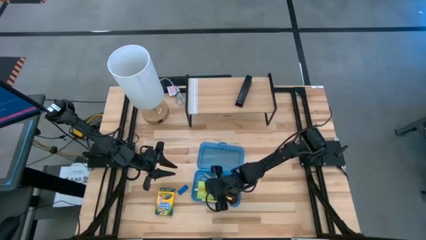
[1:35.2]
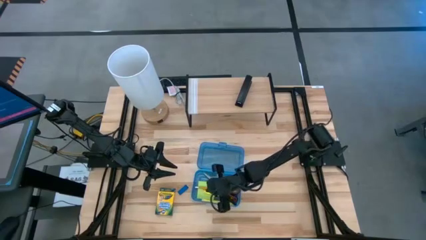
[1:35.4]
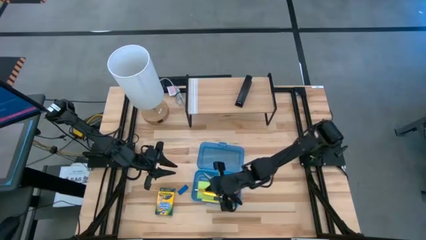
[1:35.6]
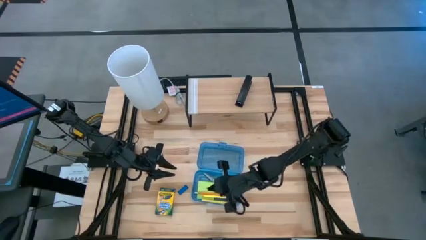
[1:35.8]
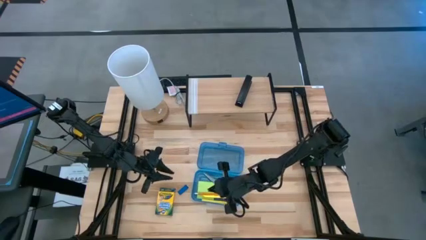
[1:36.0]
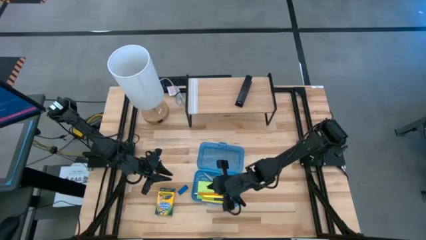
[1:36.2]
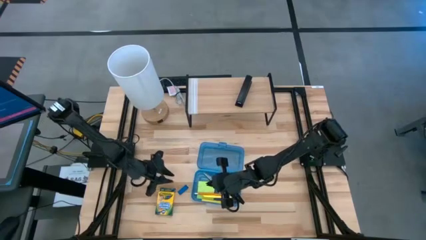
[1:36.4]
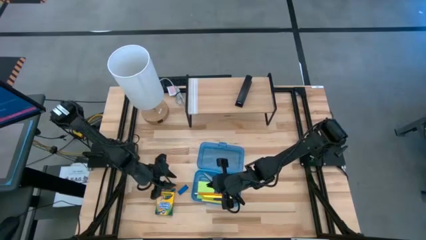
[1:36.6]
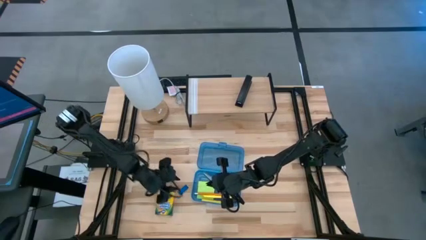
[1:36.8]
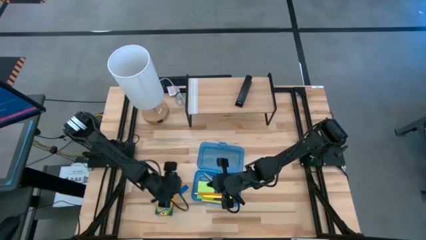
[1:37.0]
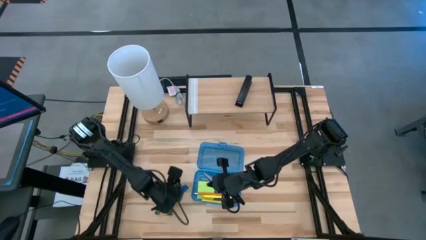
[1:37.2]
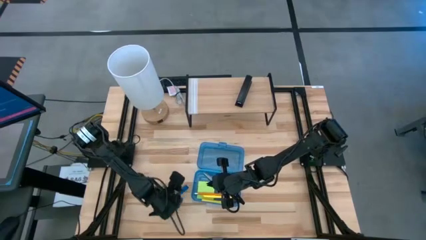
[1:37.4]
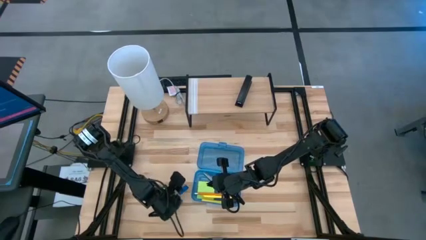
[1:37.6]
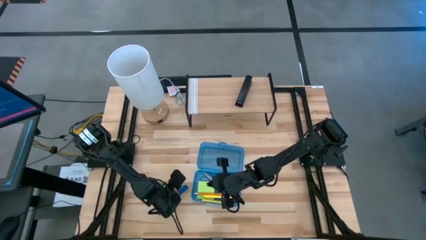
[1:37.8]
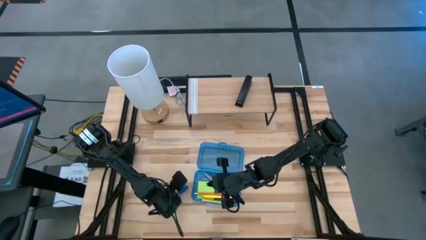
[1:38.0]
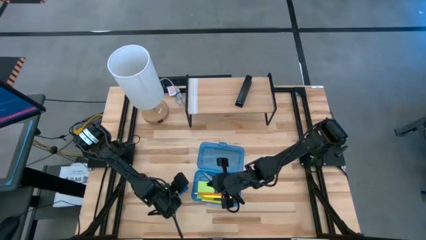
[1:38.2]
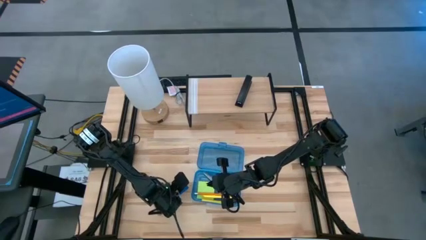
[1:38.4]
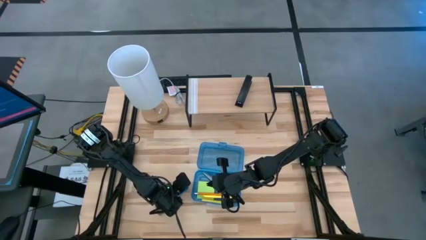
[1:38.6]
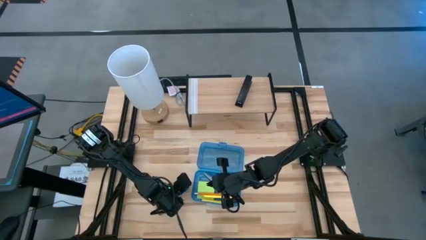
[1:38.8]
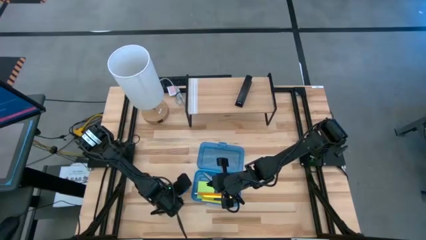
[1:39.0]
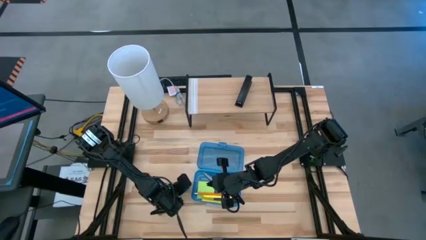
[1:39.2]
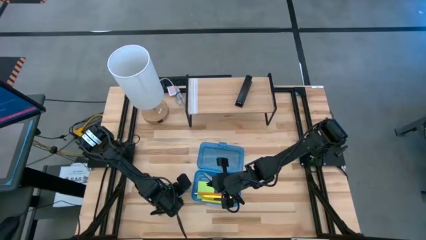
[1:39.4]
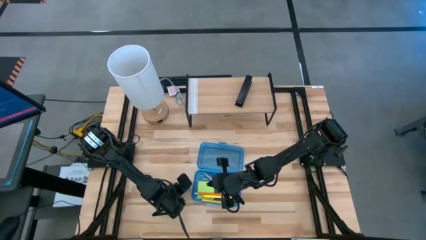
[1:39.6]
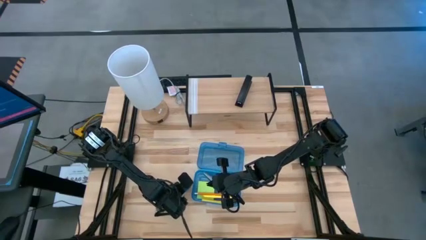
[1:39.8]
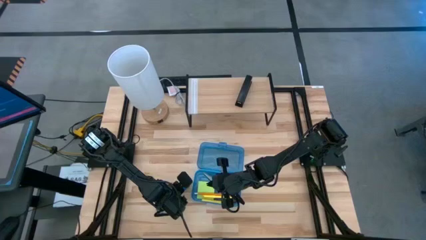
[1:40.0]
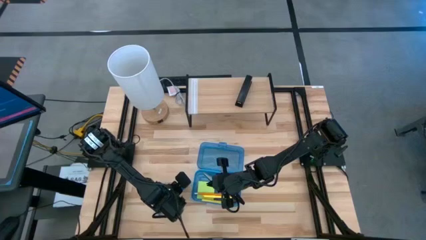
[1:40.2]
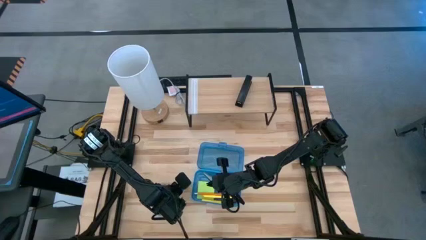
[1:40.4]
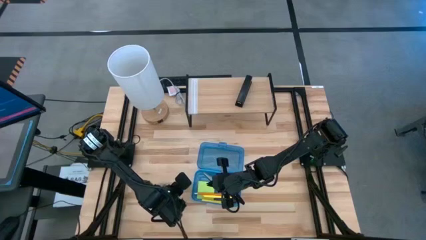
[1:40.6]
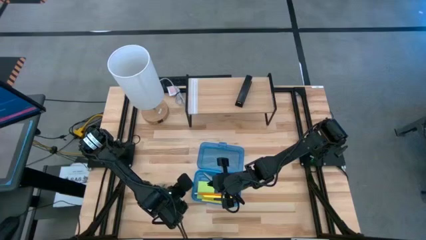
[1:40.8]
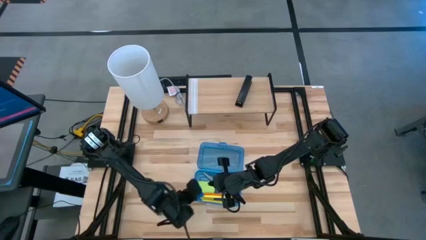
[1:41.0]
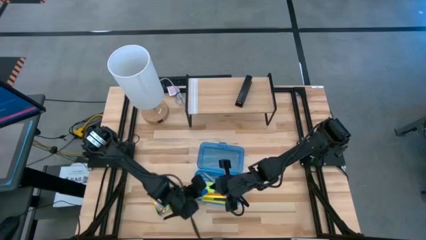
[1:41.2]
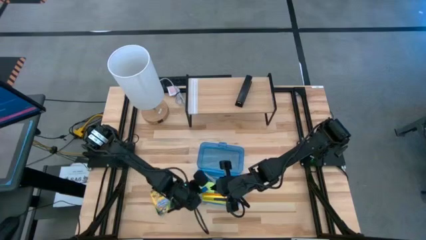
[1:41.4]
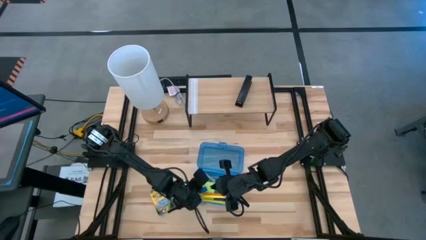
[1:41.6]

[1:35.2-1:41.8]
Task: Pack school essentials
Put the blue eraser into the blue supply box

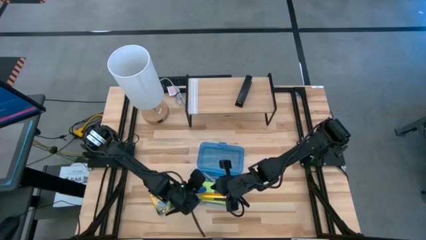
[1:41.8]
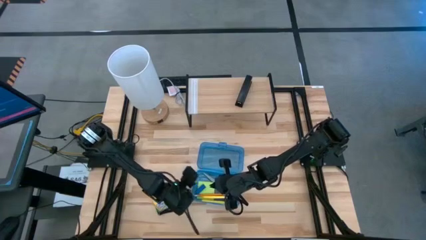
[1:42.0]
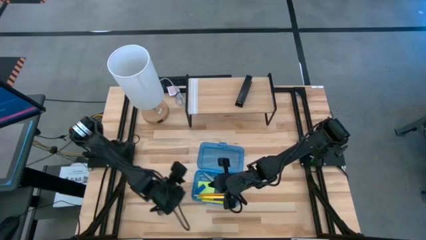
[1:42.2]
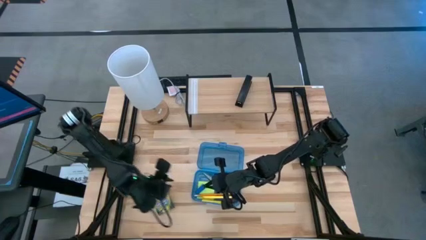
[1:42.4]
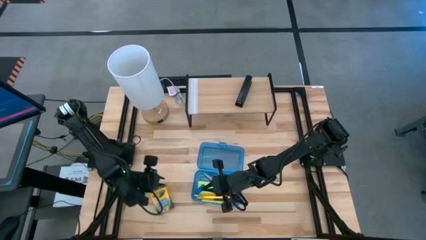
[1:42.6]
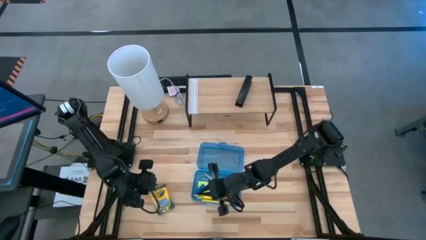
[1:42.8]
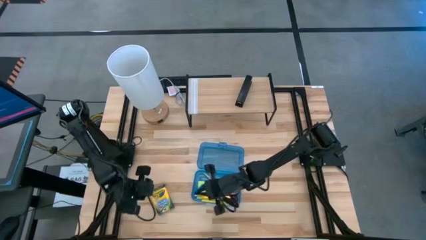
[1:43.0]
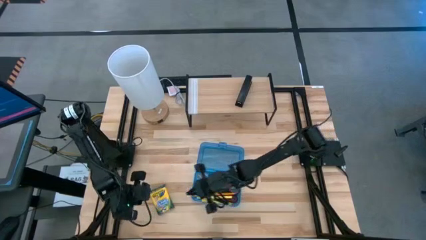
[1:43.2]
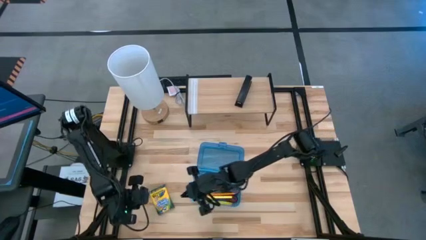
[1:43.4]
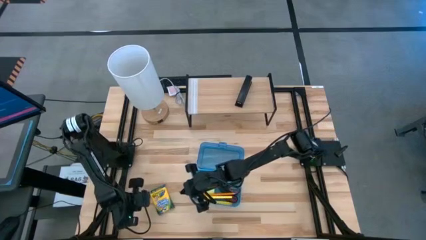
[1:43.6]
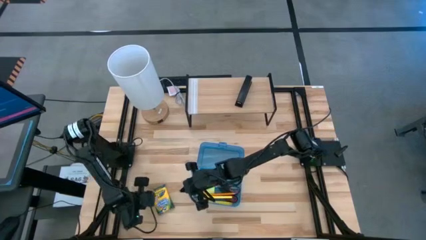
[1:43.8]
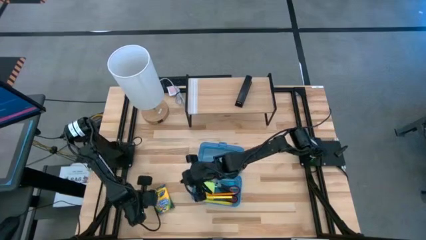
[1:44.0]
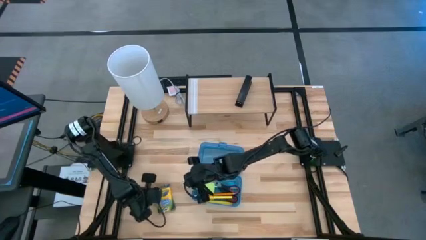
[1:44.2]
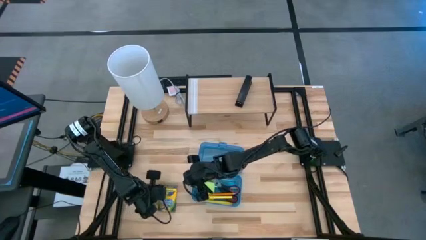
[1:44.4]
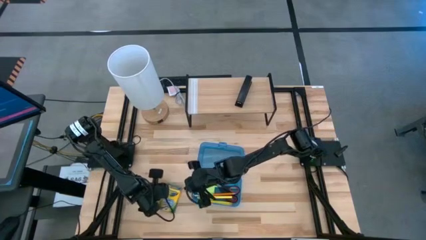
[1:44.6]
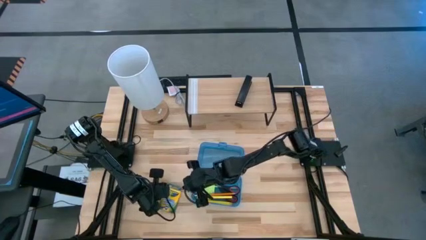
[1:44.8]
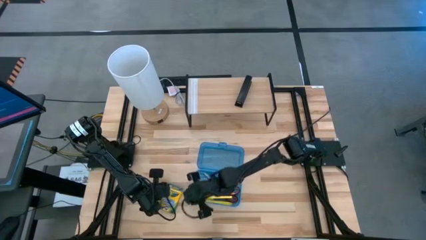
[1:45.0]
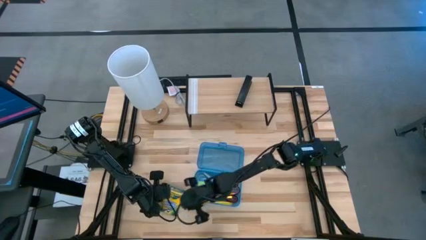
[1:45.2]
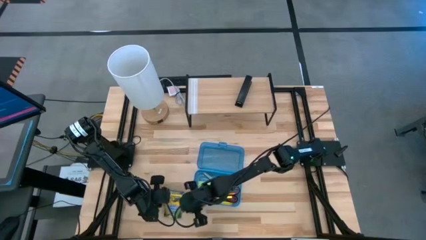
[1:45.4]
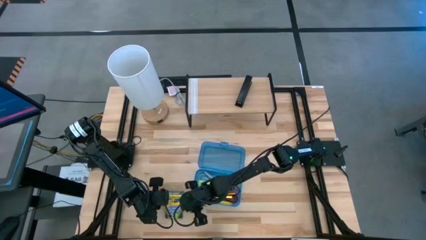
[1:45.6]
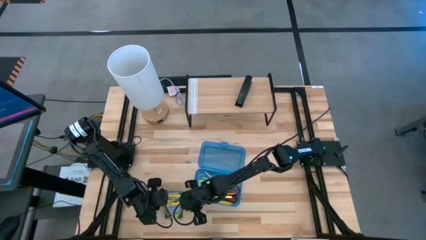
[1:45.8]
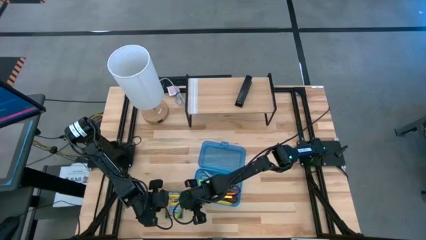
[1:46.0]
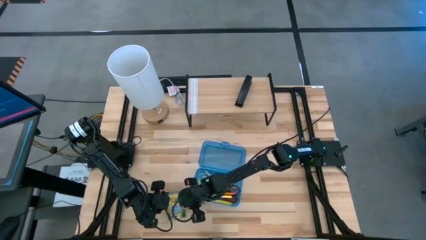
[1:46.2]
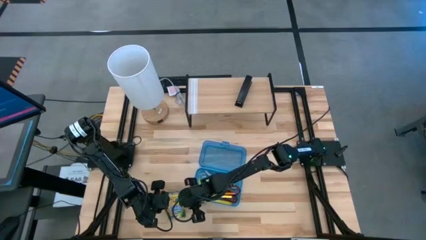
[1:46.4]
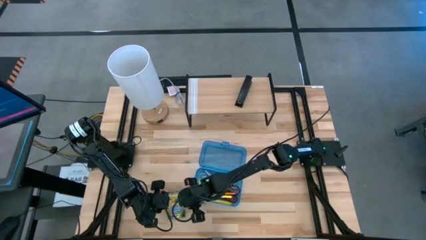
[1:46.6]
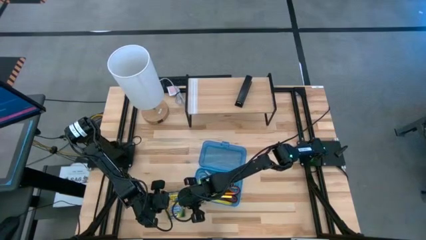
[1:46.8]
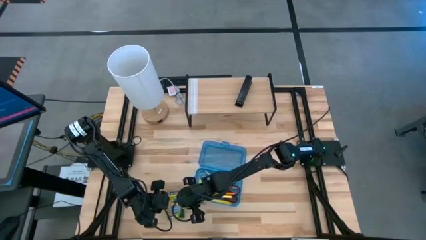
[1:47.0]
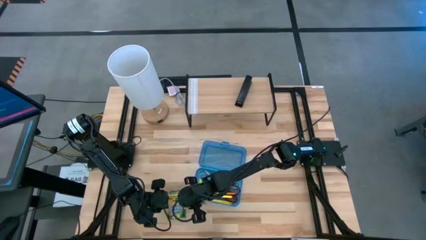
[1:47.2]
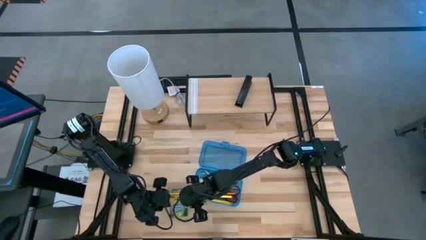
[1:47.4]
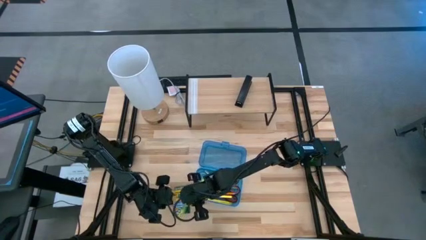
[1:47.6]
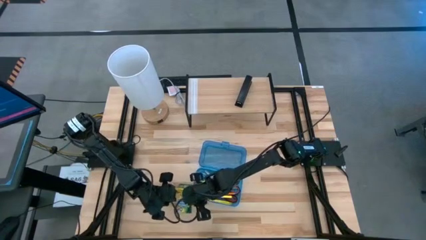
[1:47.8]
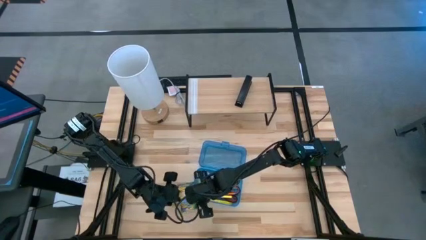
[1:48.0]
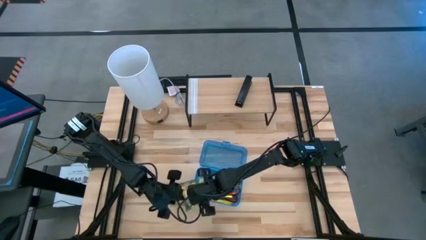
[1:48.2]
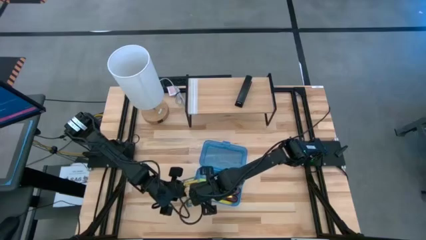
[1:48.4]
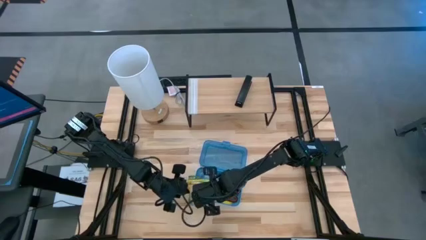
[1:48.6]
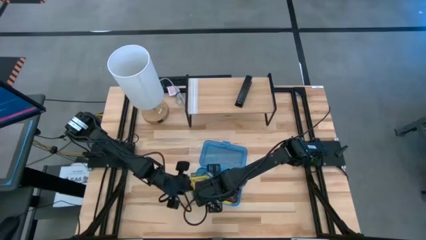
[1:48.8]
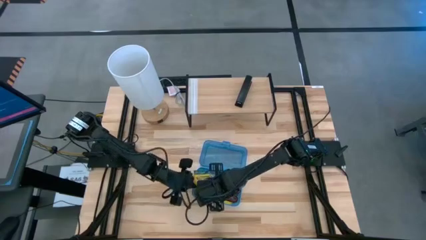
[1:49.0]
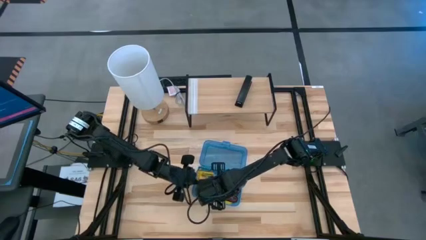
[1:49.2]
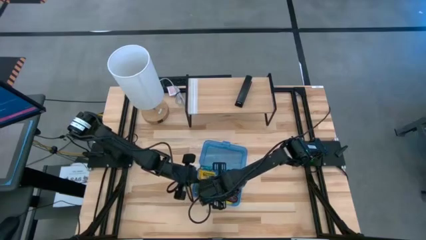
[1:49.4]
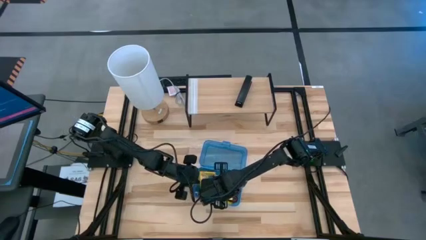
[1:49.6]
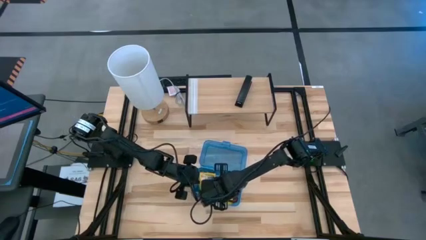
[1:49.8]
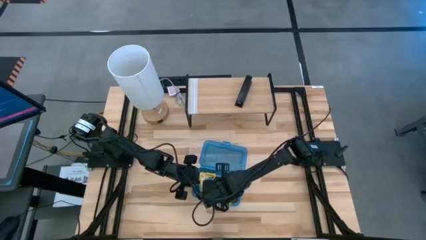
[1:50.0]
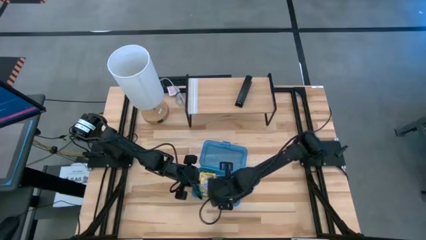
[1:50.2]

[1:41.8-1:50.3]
Put the crayon box into the blue supply box

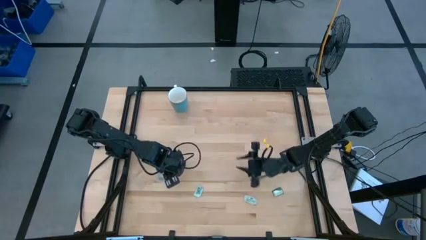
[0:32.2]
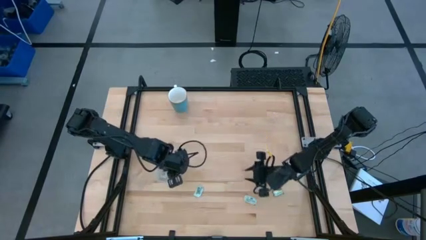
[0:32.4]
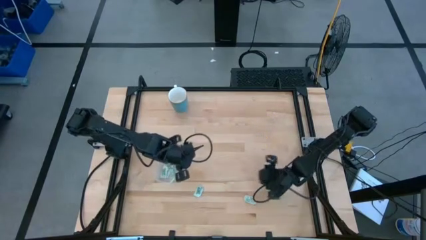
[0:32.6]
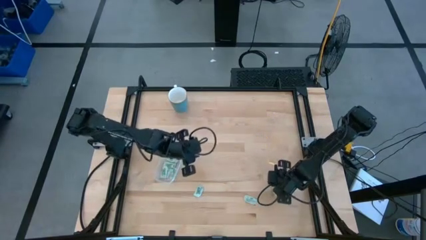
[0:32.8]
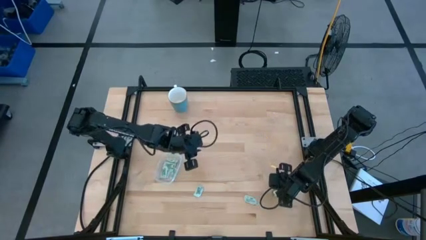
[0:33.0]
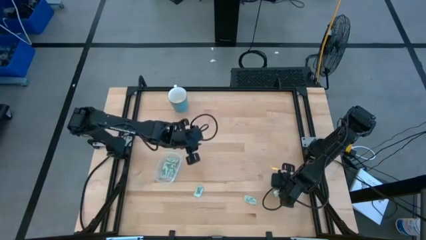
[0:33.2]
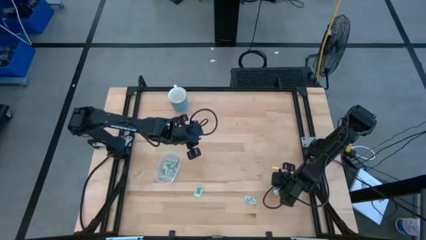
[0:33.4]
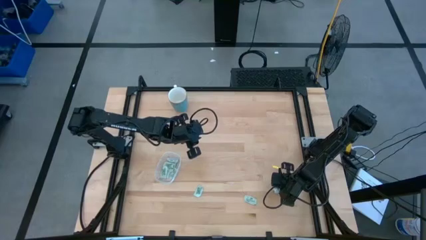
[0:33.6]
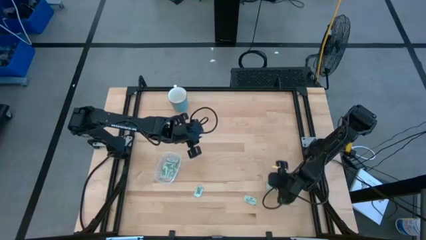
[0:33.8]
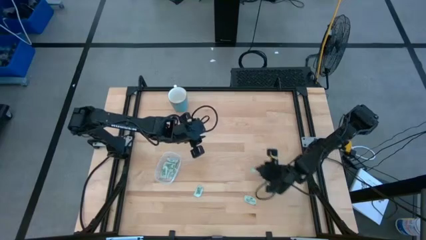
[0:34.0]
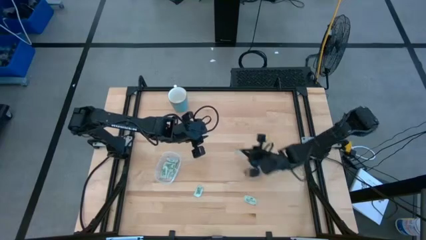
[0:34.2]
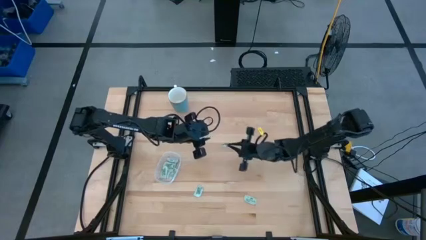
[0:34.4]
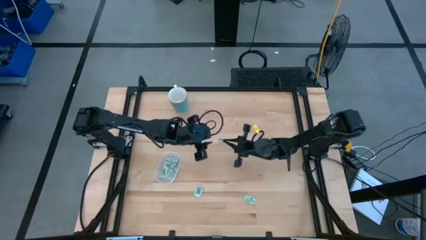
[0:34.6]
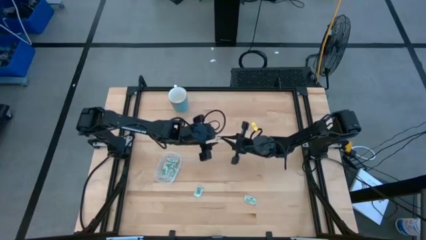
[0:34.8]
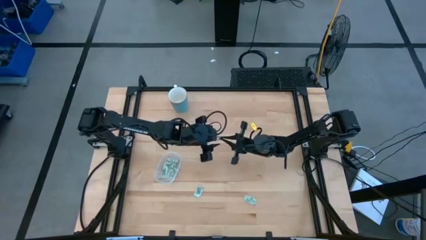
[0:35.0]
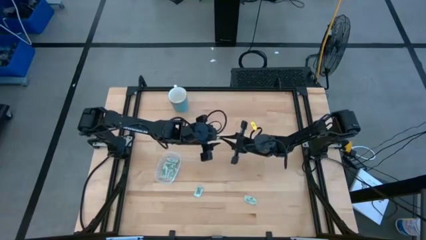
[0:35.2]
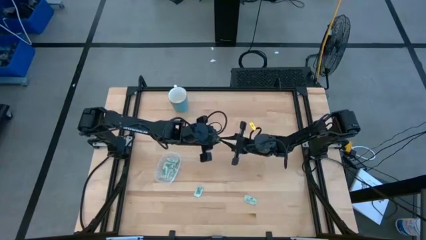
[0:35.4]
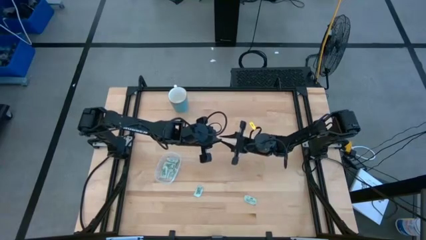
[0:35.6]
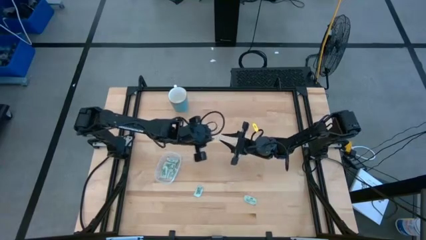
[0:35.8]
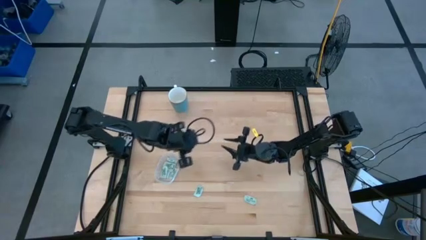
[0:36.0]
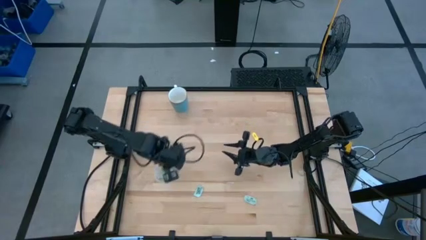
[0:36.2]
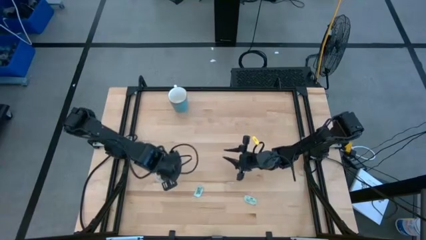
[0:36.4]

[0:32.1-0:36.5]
Task: Pick and place Stevia / Truvia into bins
Put the stevia packet into the transparent container
